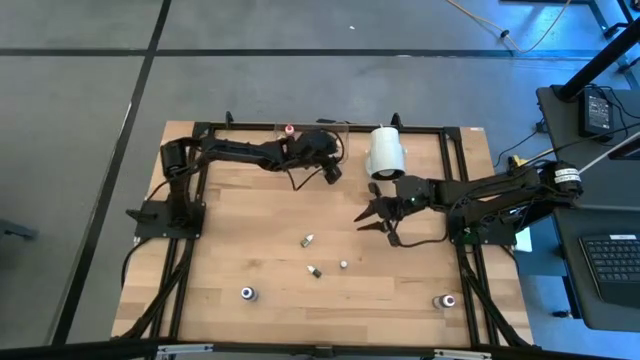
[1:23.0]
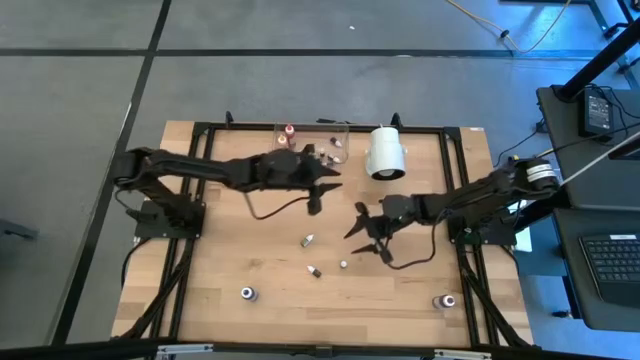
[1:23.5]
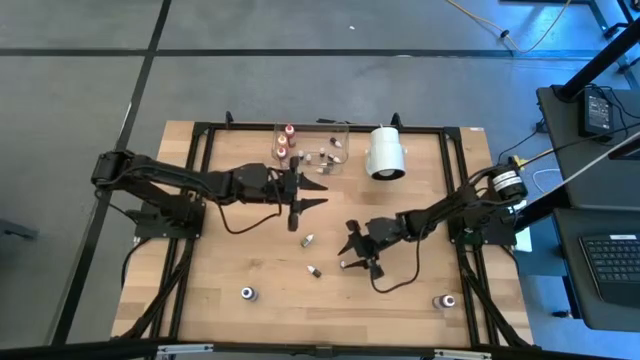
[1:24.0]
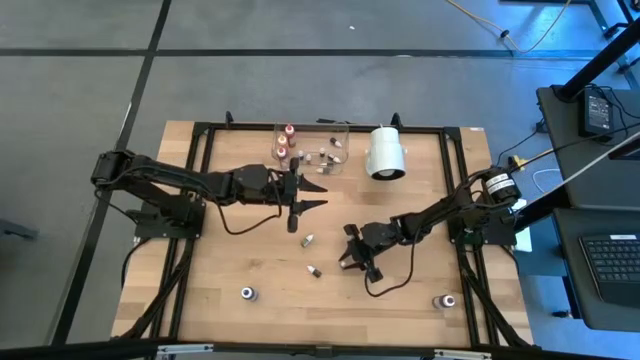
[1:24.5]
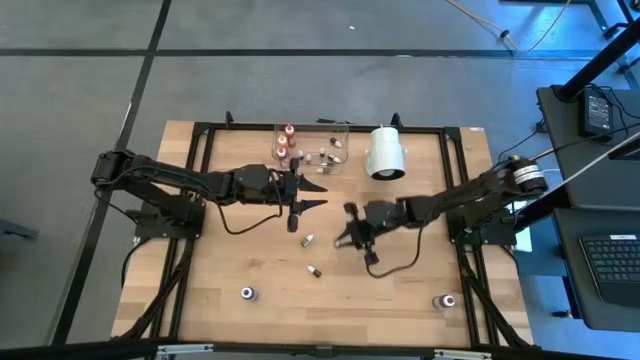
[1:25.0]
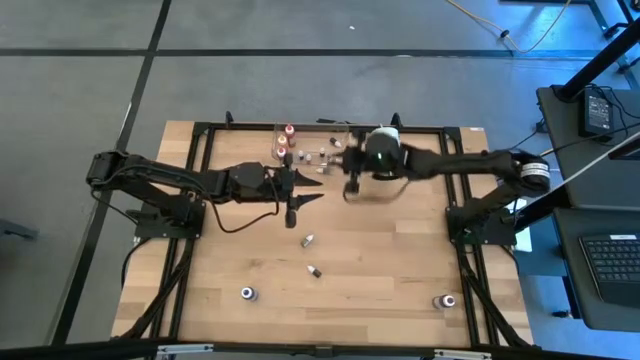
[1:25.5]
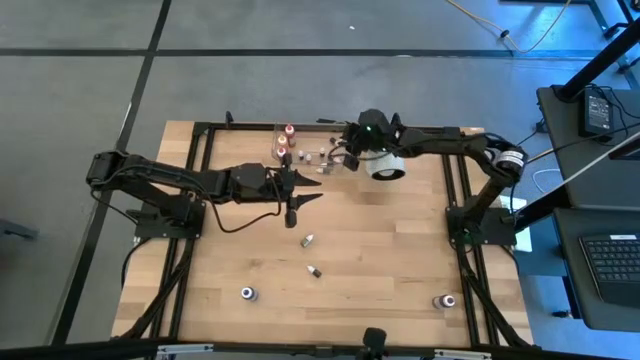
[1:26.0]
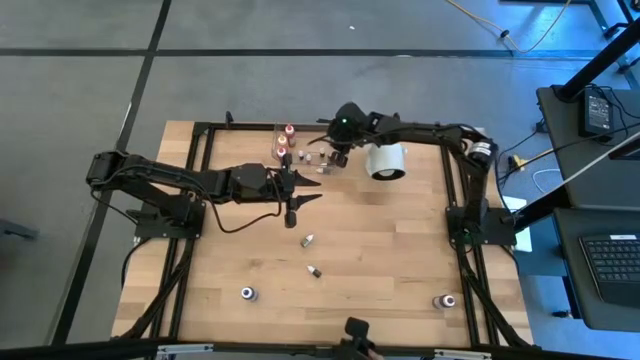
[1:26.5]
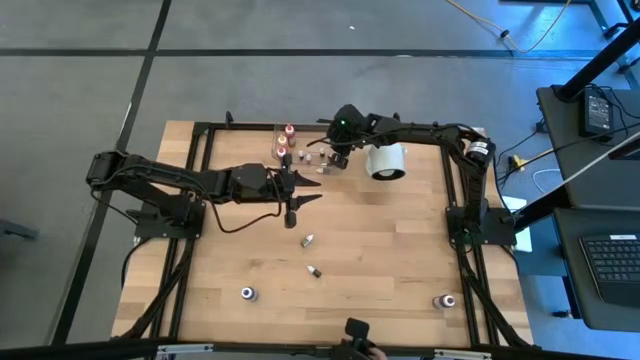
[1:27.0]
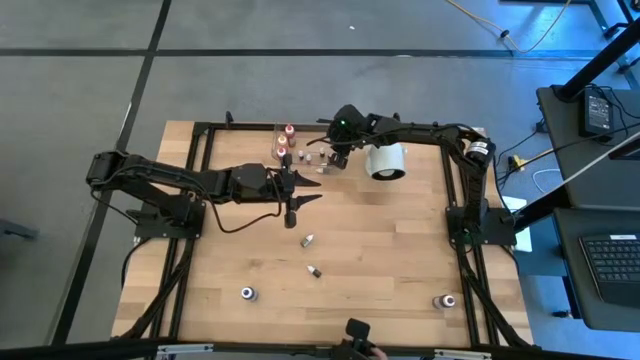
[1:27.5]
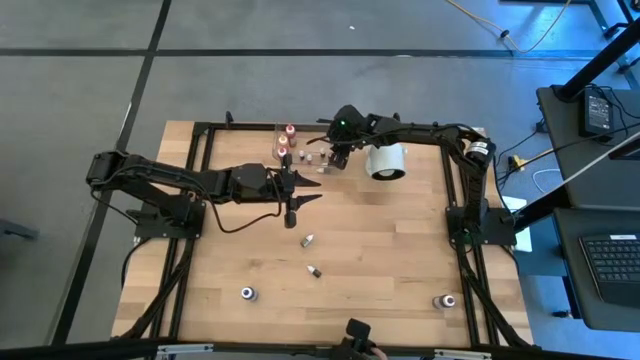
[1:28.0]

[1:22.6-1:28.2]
Task: Pick & Place food coloring
Put the purple food coloring bottle into the transparent bin

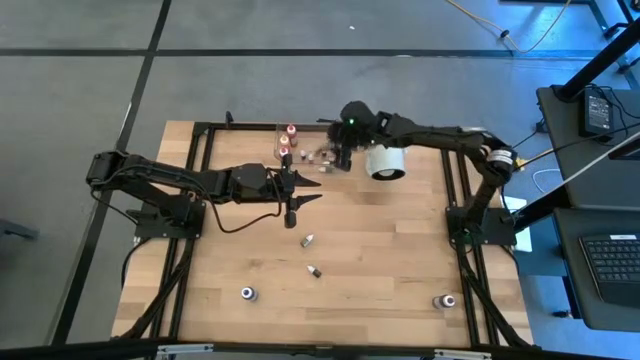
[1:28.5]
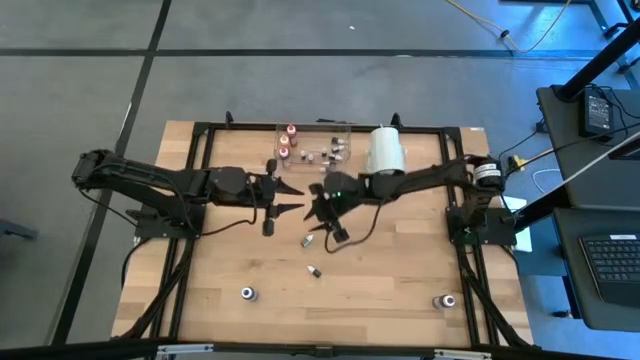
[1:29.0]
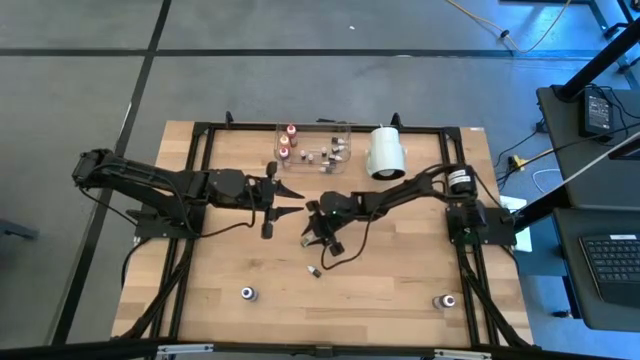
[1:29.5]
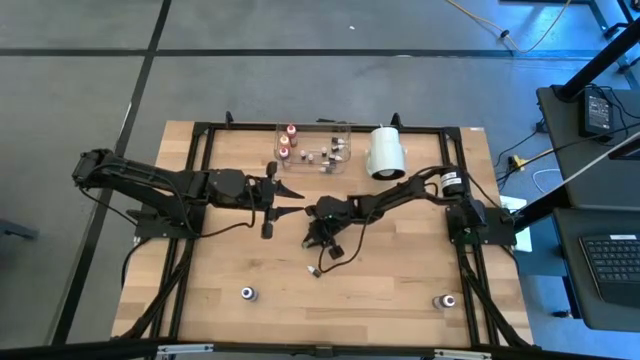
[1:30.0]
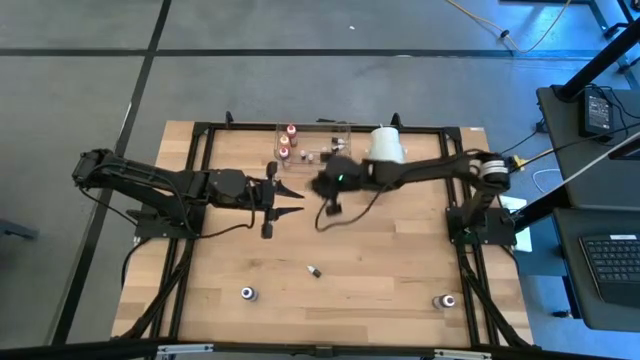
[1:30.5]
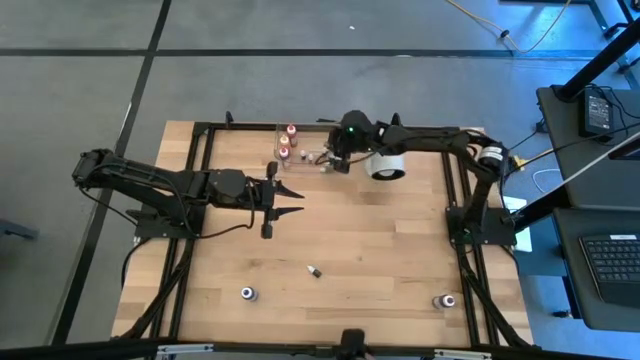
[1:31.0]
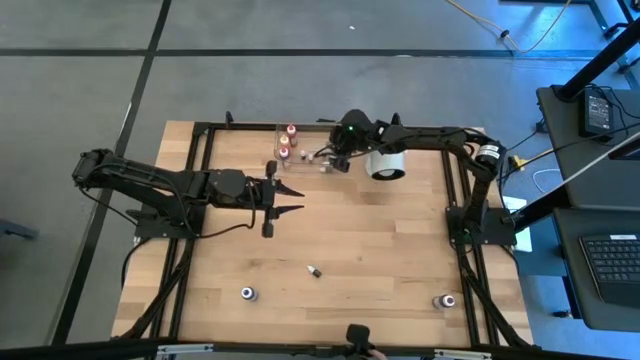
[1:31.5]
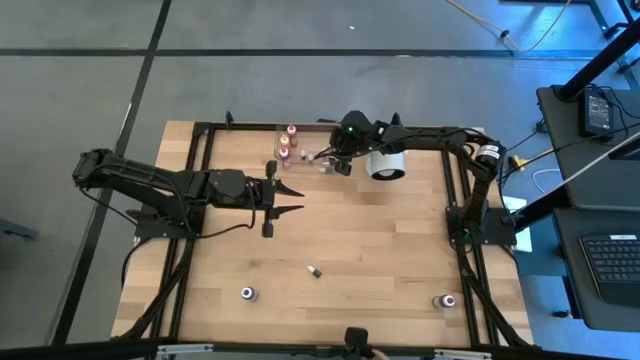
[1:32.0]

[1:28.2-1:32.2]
Put the green food coloring bottle into the transparent bin

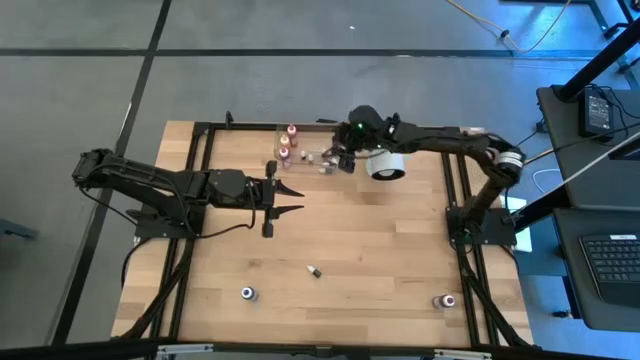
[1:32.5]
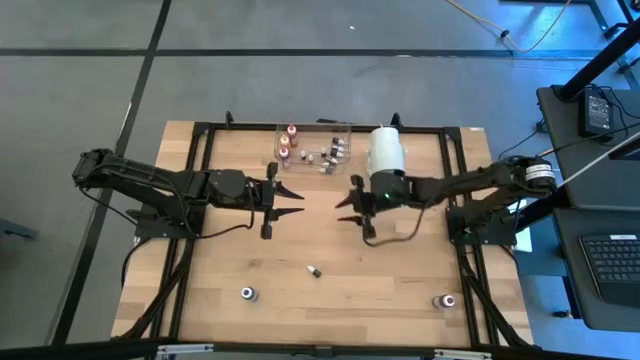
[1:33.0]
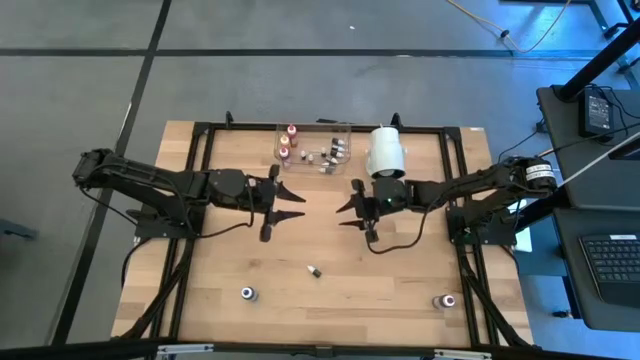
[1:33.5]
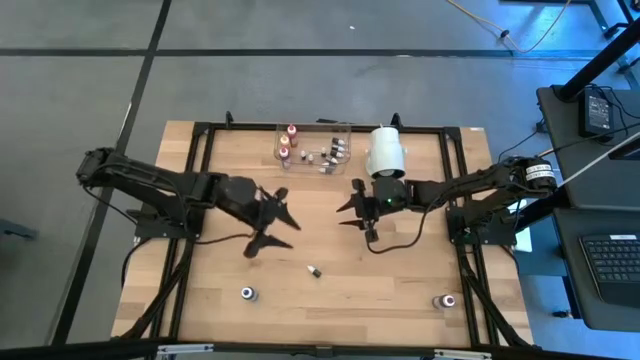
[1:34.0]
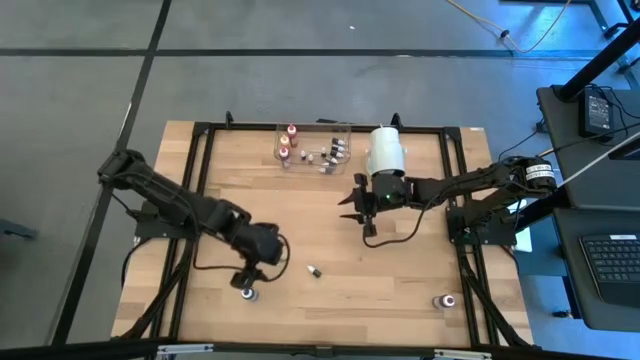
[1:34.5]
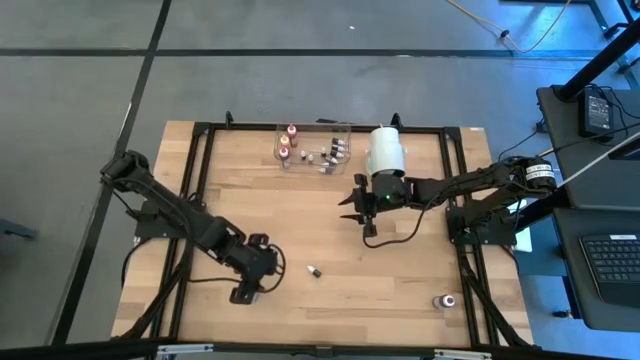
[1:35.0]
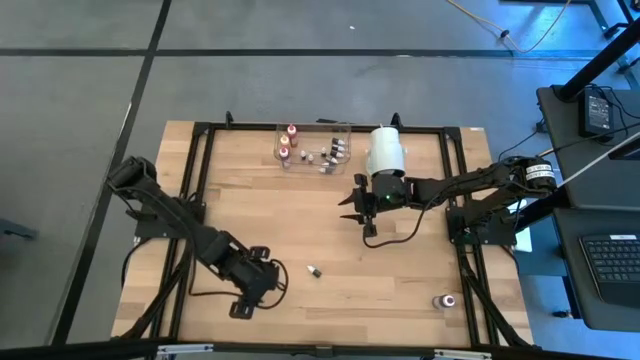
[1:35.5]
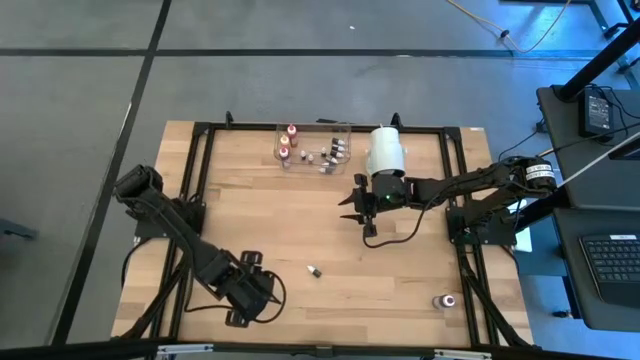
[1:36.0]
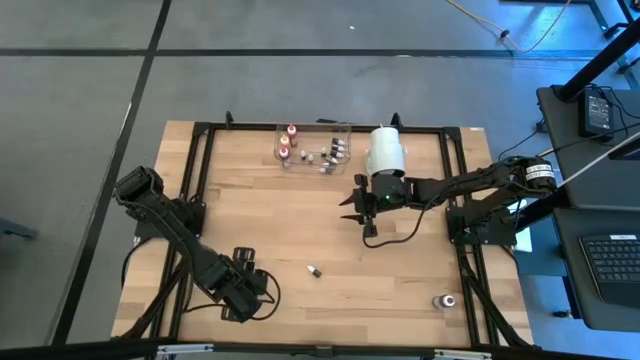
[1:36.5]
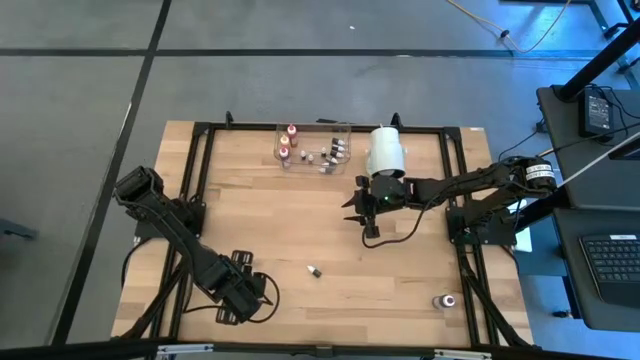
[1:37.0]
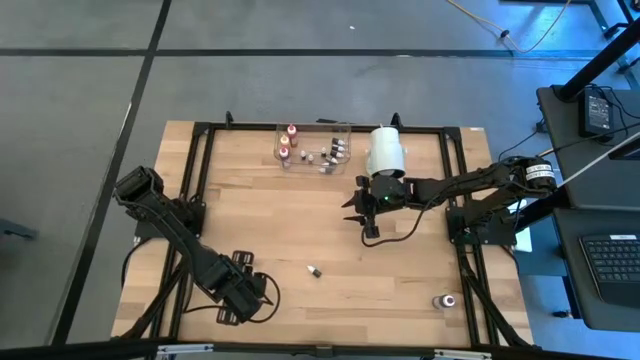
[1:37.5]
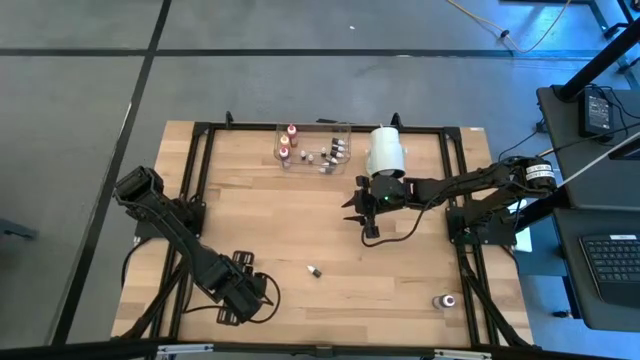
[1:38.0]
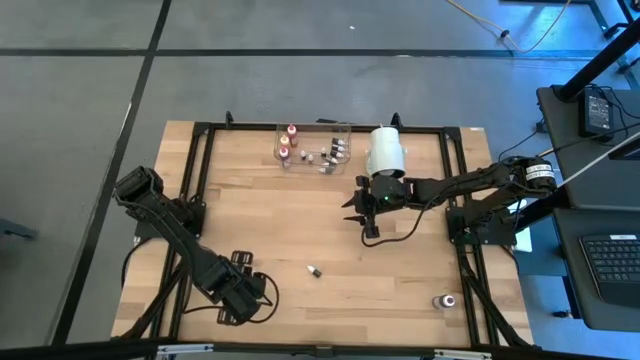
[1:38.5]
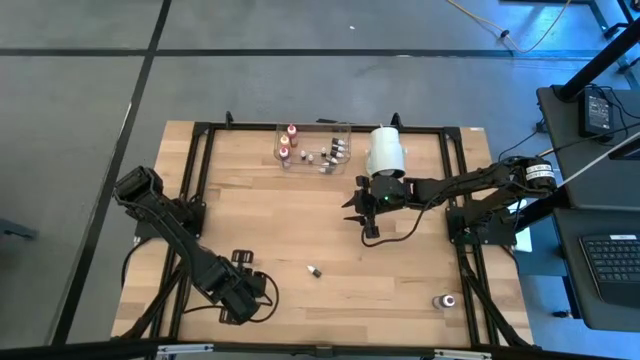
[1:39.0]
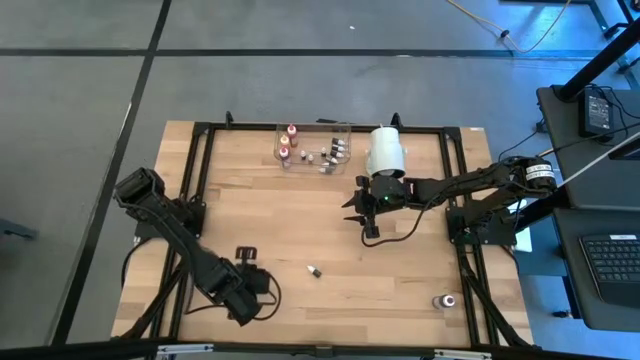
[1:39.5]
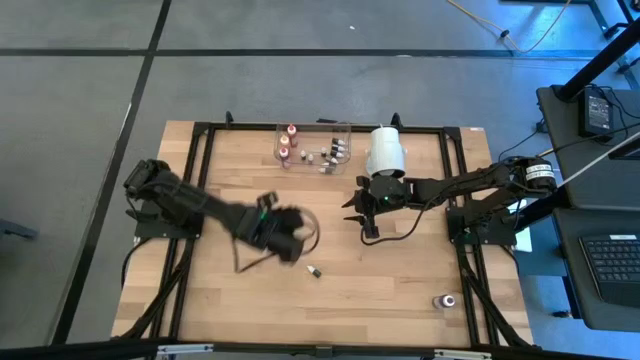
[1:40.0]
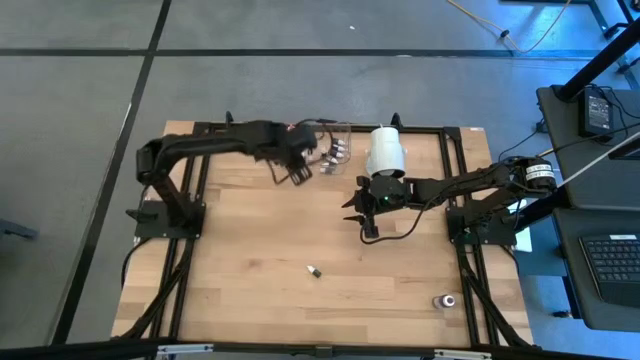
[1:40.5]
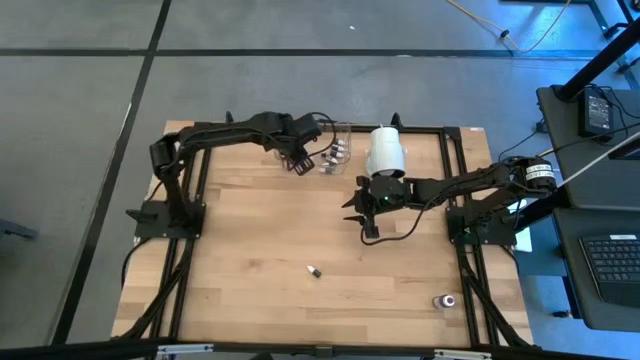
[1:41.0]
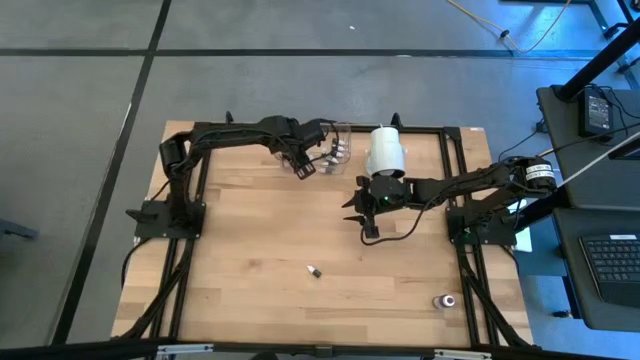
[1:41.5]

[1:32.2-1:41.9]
Put the blue food coloring bottle into the transparent bin

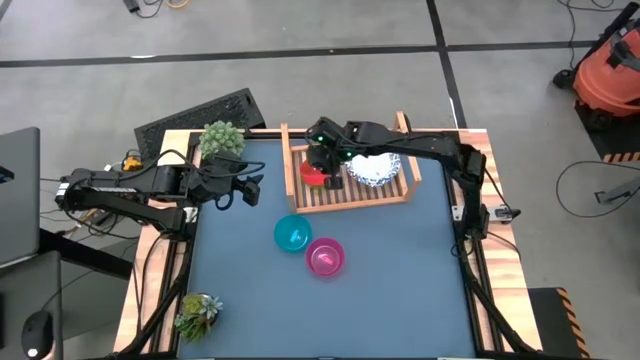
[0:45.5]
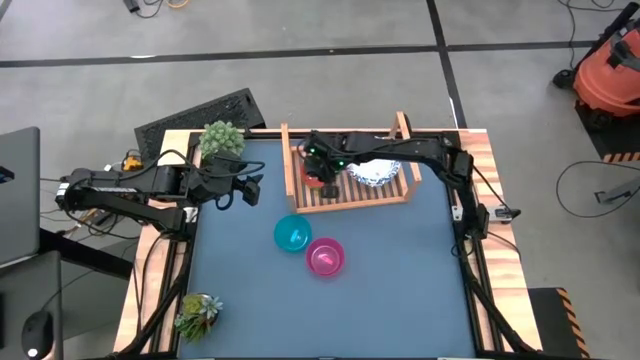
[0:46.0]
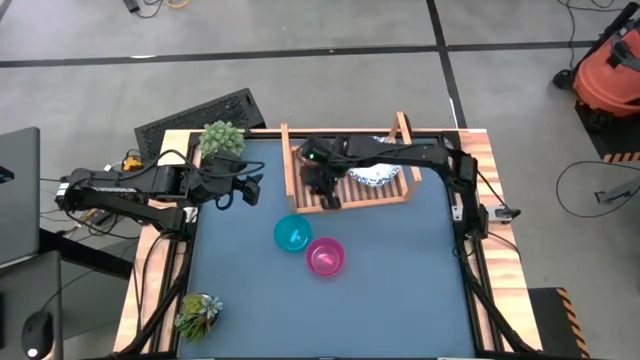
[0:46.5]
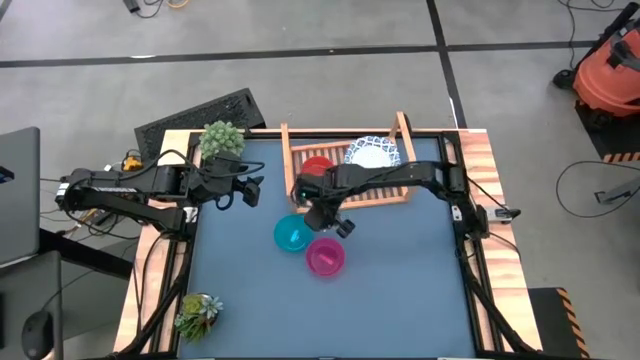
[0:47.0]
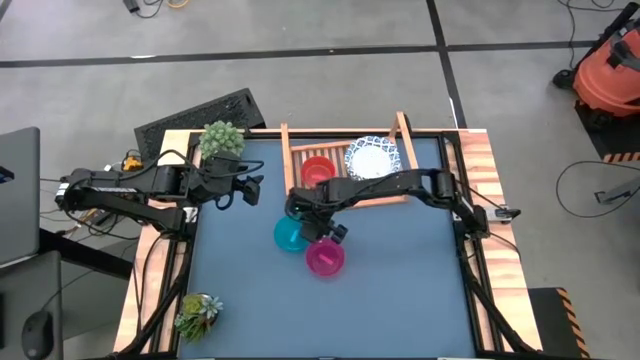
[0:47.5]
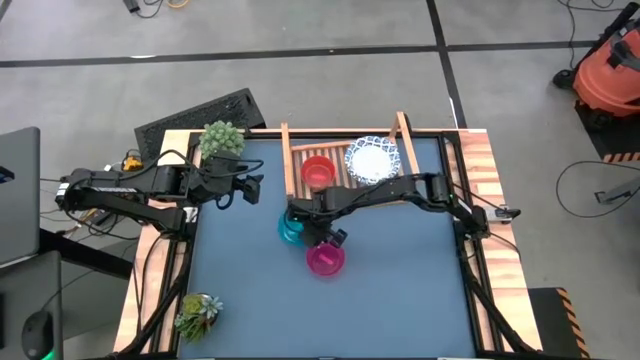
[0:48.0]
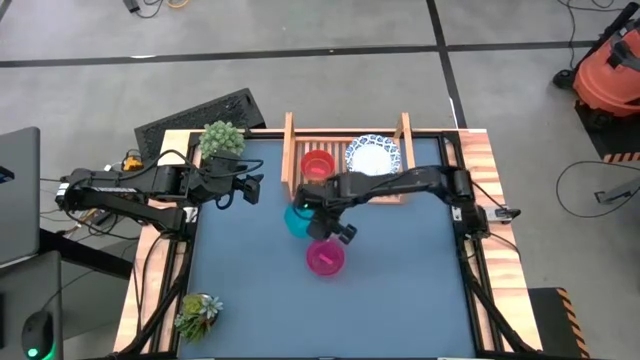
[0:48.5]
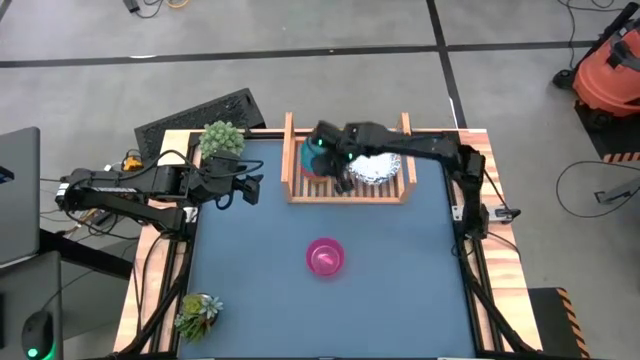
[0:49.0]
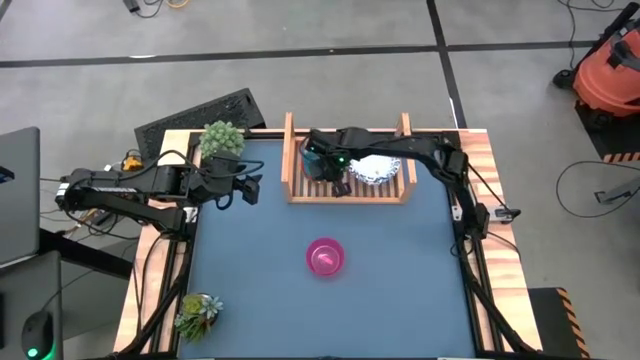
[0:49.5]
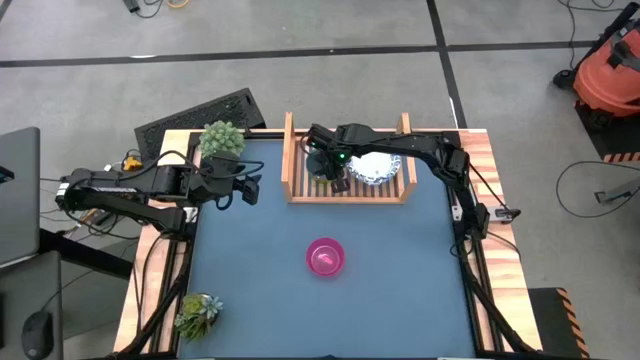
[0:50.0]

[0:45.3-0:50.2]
Task: Place and stack bowls onto a shelf
Stack the blue bowl on top of the orange bowl on the shelf
